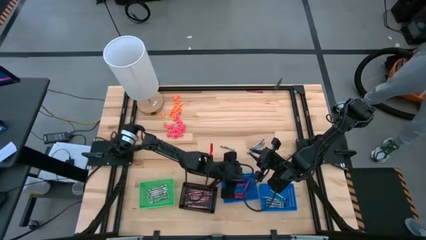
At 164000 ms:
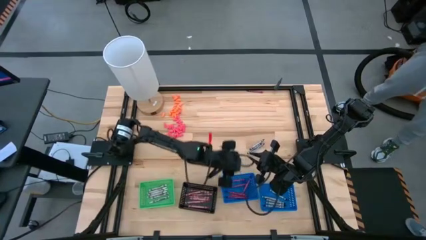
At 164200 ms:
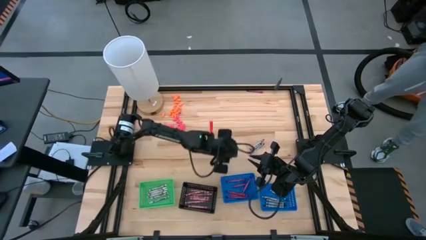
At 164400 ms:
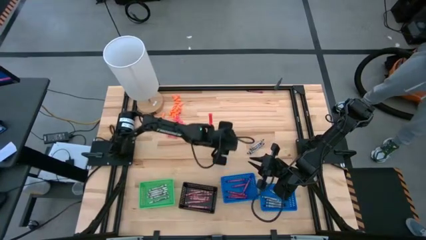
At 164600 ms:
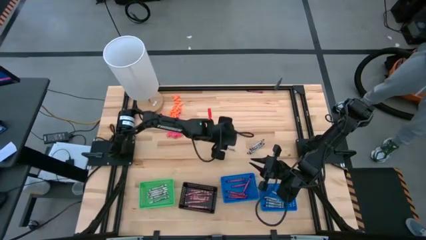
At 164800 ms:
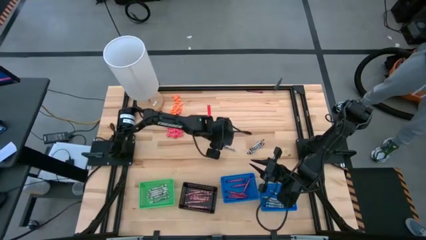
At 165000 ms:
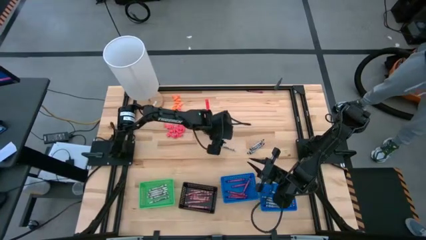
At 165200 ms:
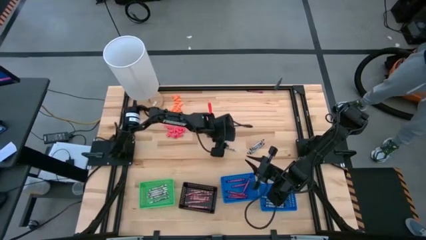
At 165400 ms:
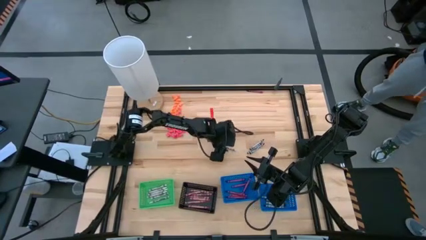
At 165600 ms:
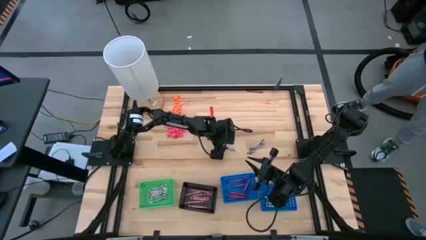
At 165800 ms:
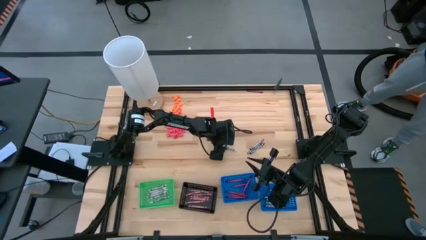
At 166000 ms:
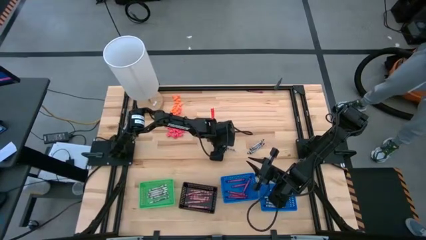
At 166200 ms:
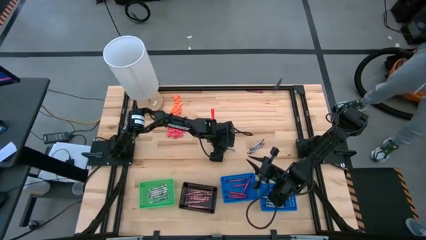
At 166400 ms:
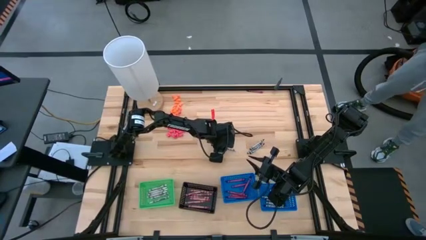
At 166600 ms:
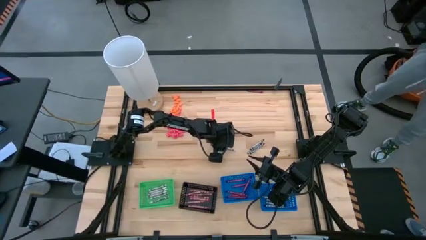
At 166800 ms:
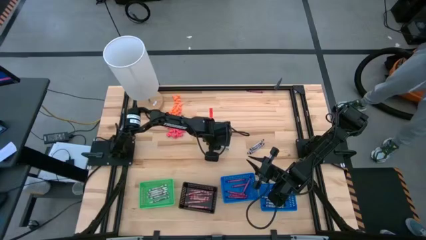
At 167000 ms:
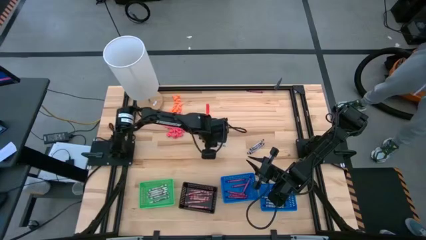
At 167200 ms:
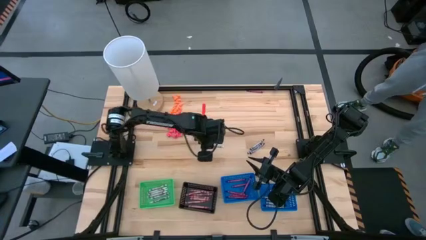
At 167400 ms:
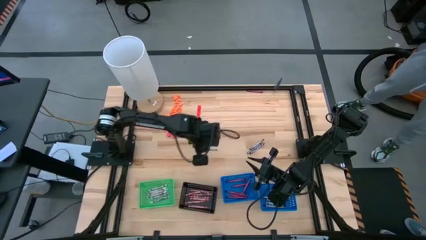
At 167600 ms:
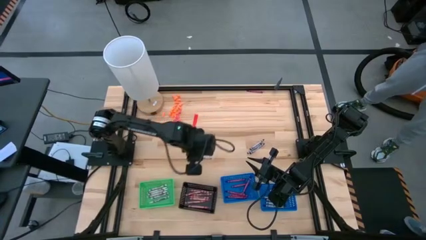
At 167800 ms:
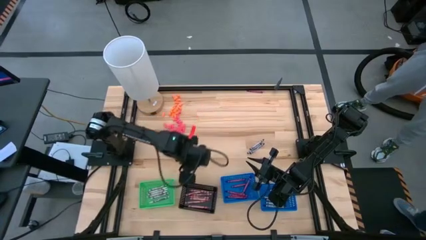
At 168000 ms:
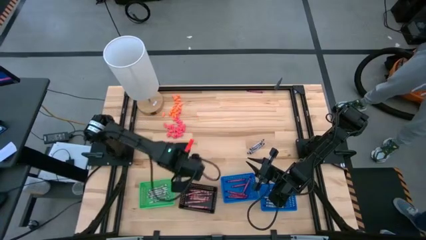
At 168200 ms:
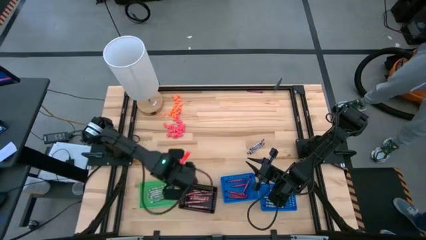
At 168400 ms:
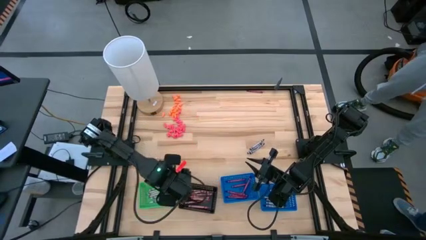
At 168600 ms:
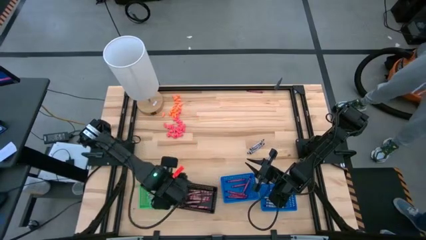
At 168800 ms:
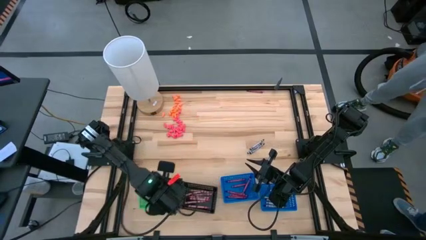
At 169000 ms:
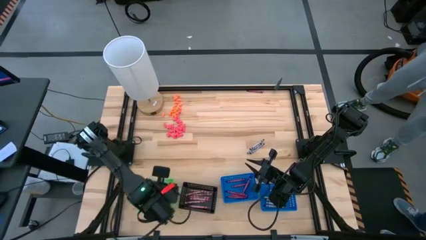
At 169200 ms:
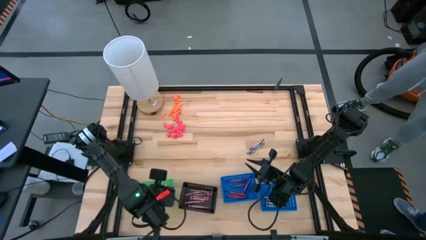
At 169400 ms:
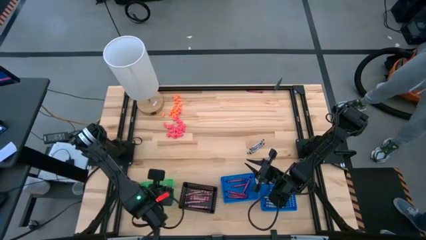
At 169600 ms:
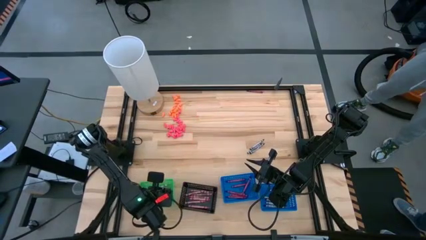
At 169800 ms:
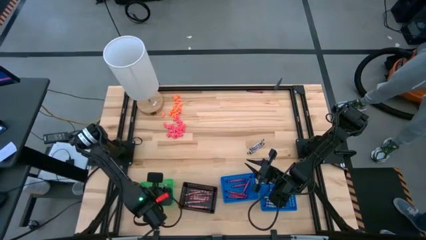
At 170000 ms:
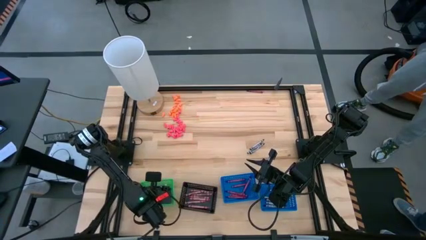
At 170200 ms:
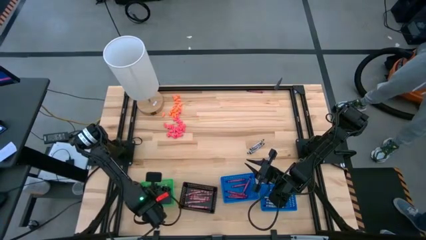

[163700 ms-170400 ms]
Task: Sort crayons
Put the white crayon into the green bin

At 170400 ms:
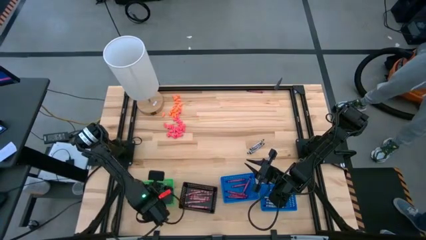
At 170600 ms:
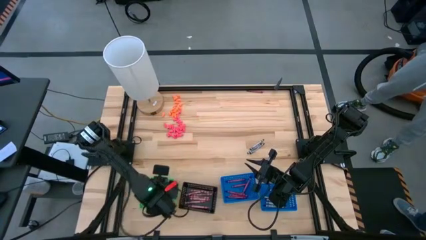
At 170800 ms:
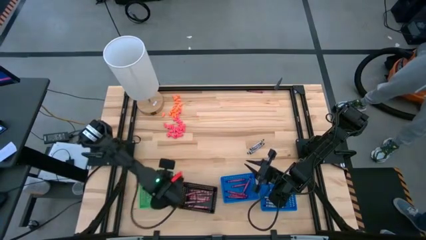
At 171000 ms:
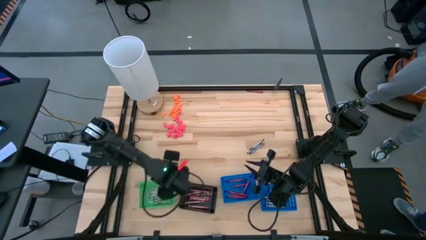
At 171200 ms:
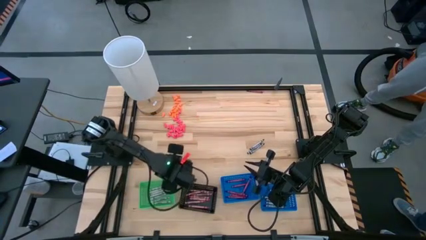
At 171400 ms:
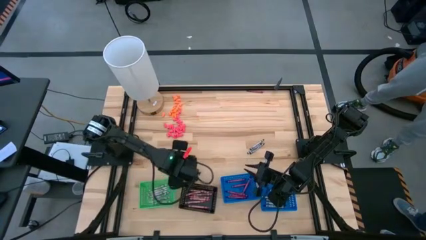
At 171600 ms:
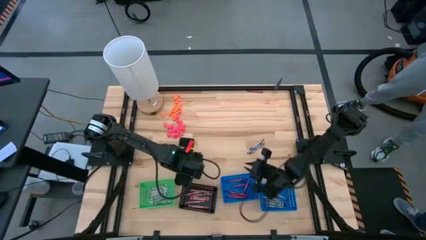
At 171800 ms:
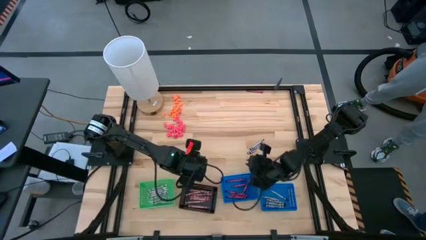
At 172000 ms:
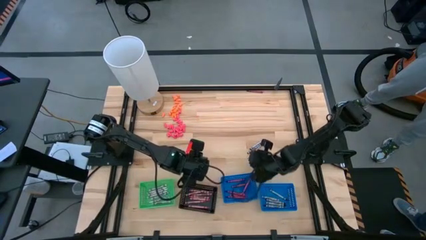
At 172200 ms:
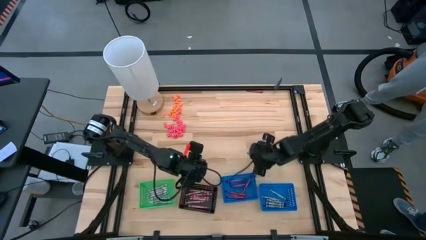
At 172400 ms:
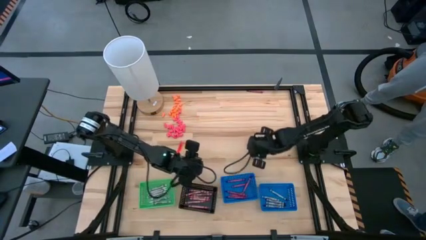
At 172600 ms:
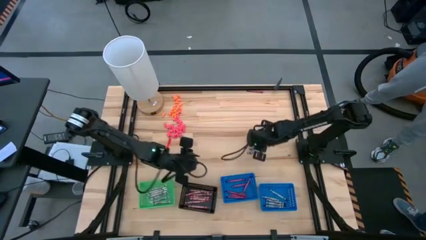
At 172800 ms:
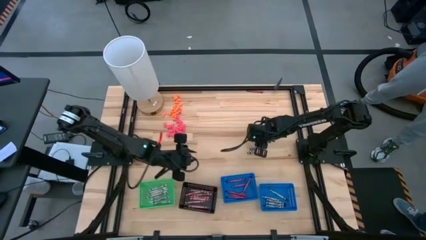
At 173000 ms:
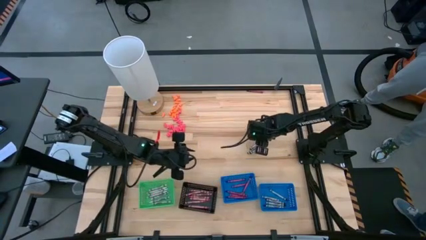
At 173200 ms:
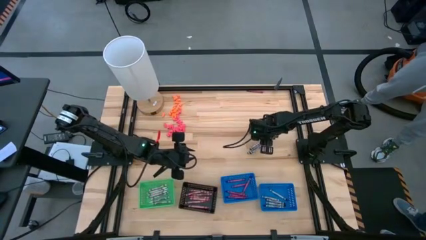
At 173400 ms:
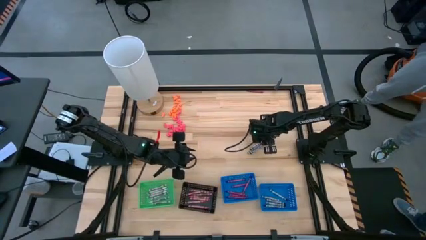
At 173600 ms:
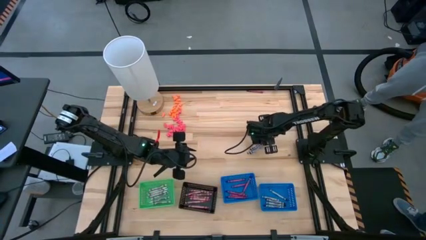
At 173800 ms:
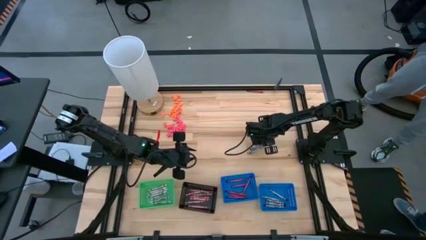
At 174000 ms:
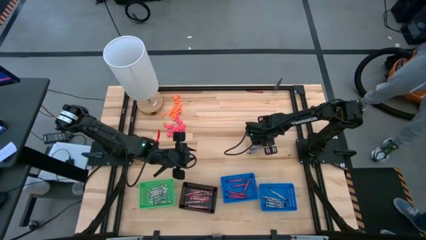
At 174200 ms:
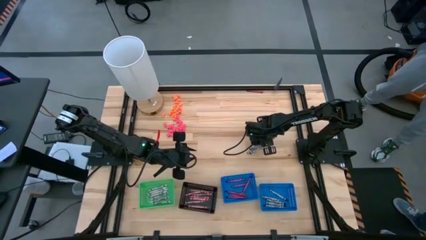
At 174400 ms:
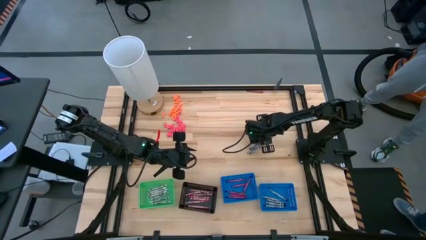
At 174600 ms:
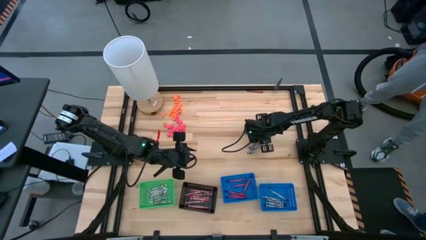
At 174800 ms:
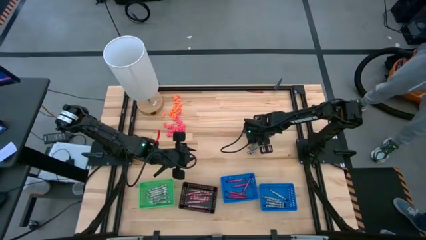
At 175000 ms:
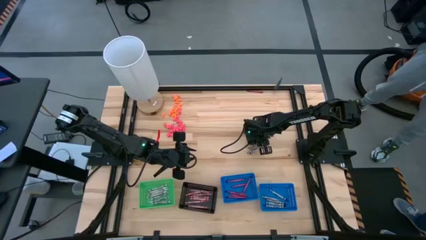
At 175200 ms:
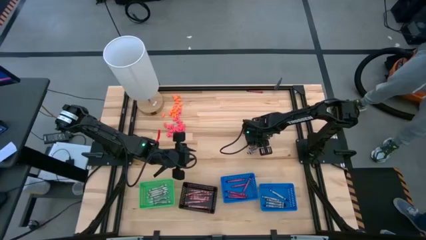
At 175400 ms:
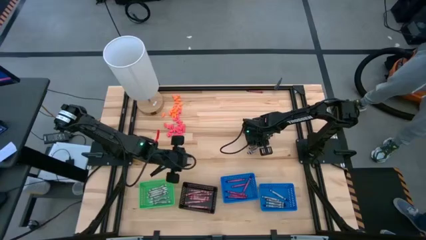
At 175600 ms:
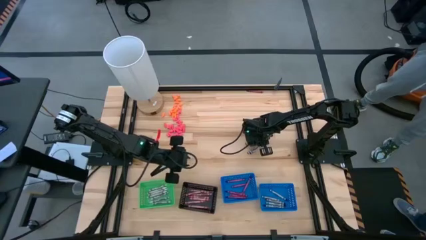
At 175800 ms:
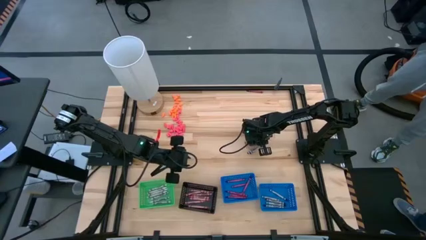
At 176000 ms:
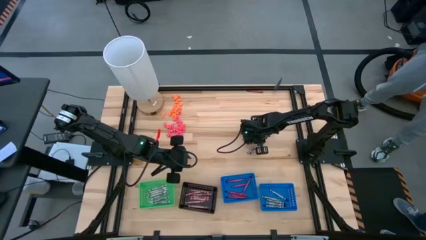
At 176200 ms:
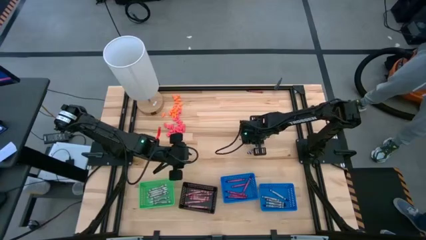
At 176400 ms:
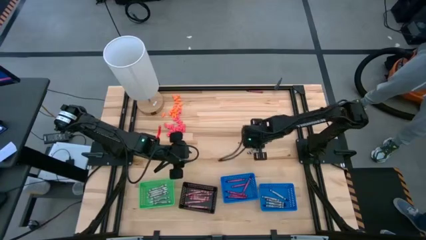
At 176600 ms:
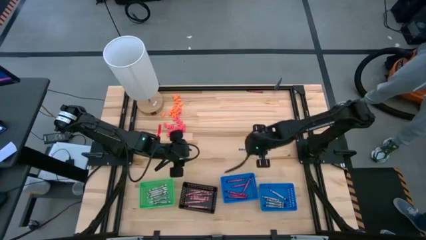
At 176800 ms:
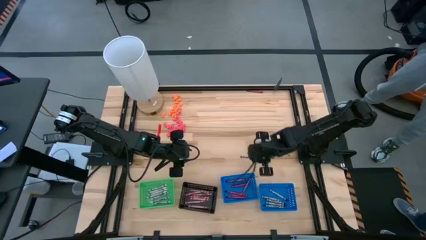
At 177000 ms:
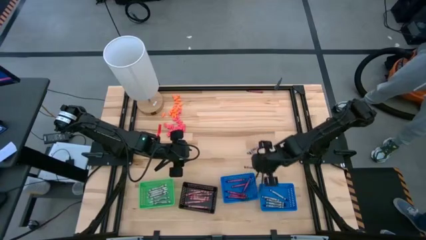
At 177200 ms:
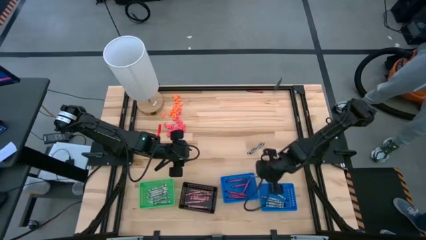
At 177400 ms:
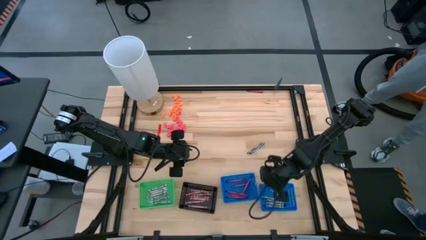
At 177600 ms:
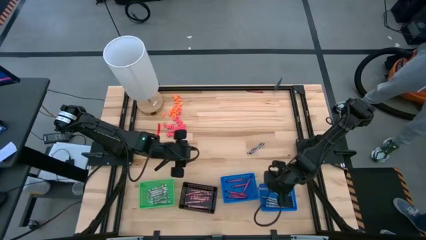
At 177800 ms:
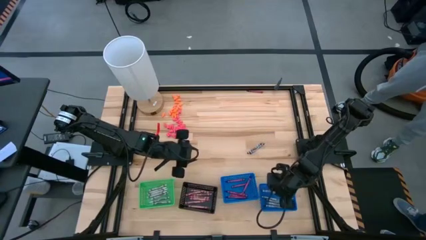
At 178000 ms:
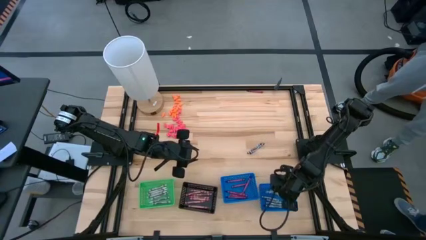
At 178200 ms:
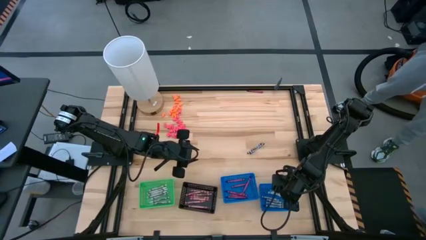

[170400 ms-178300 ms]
Put the black crayon into the right blue bin

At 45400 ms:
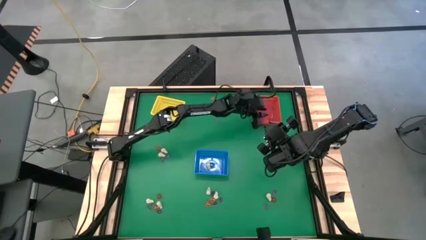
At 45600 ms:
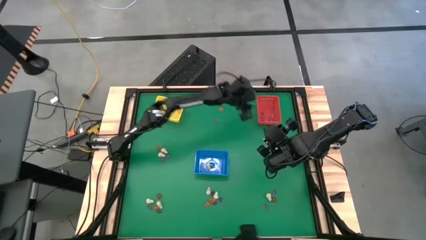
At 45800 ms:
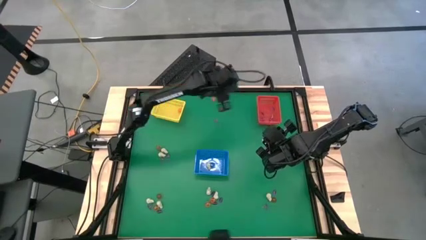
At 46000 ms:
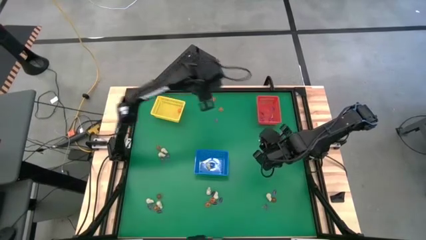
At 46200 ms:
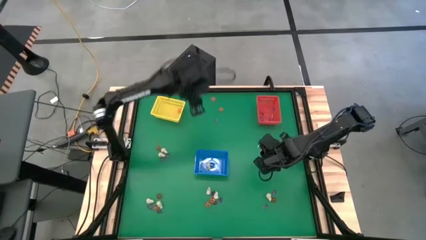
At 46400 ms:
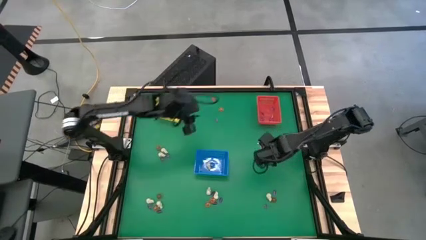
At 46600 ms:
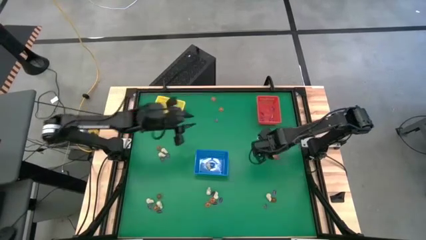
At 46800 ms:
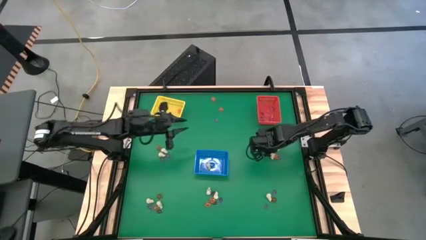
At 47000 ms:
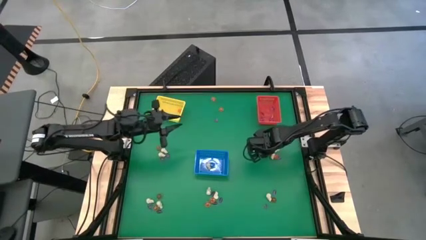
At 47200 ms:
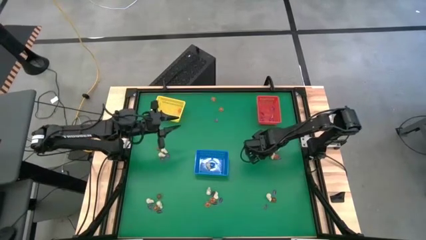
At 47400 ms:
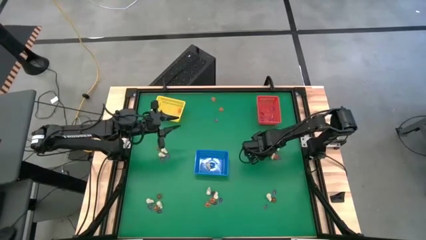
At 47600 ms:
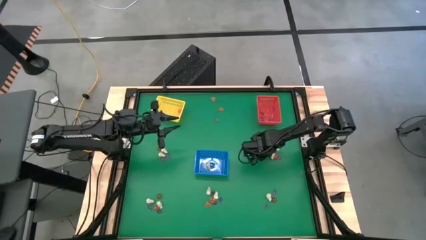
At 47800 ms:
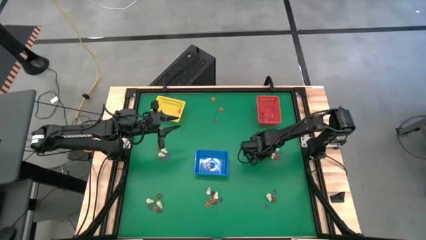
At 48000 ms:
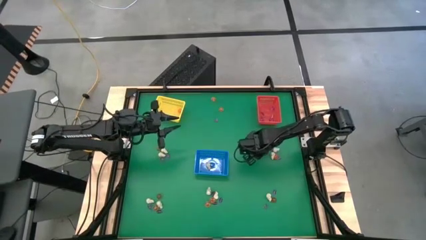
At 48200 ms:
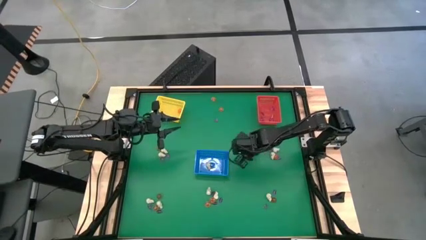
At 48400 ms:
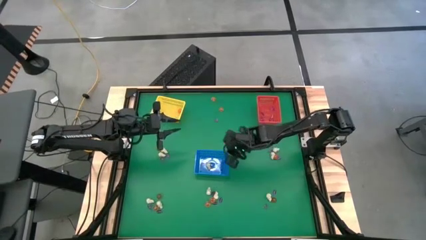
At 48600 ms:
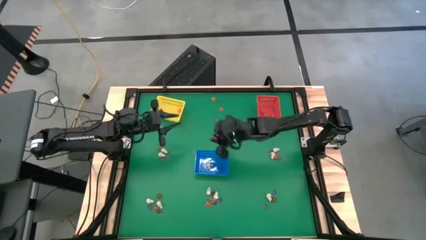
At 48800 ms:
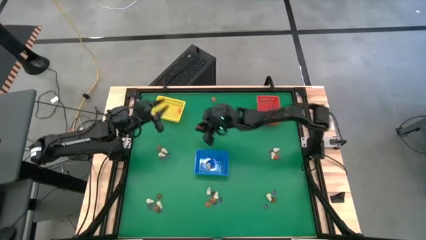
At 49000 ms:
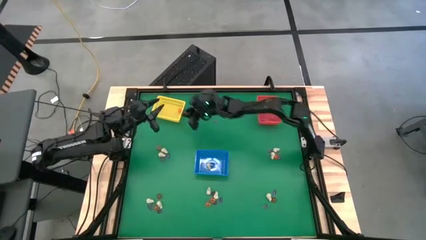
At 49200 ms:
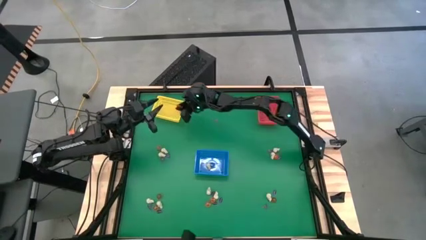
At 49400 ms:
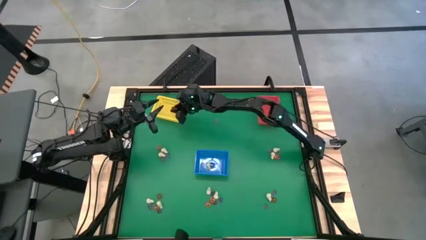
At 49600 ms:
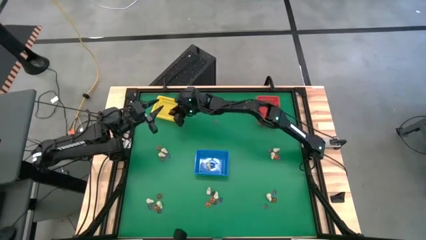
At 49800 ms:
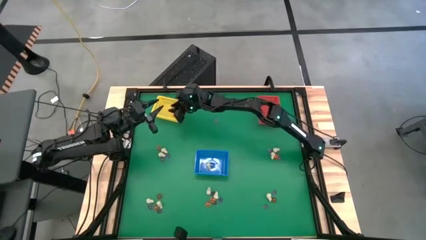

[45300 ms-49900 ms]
Task: Sort Halloween decoration
Put the orange pumpkin toy into the yellow bin
